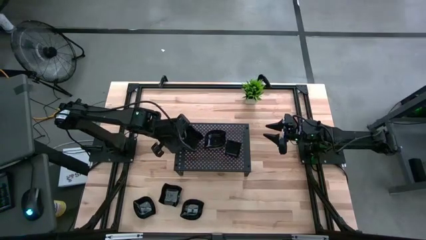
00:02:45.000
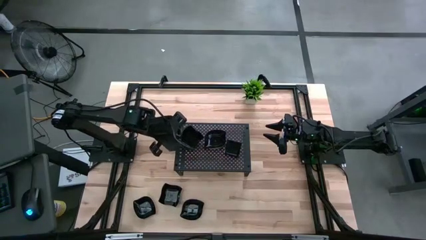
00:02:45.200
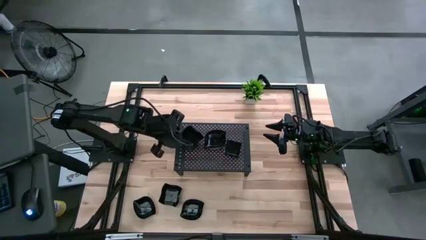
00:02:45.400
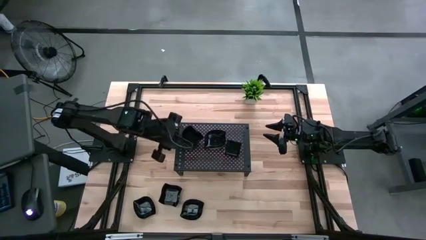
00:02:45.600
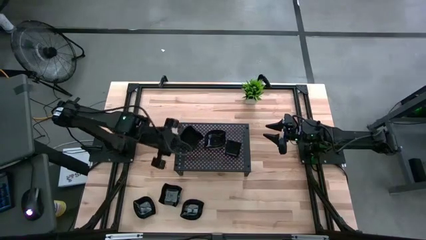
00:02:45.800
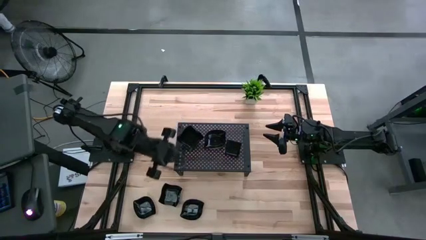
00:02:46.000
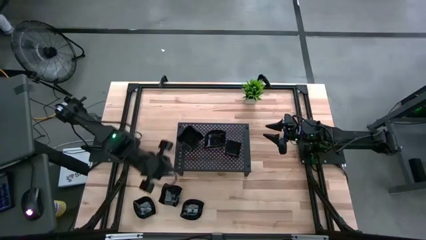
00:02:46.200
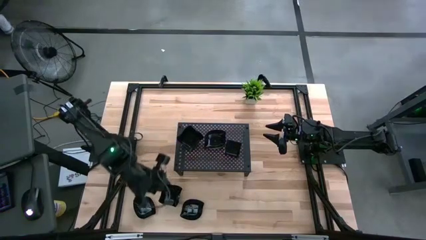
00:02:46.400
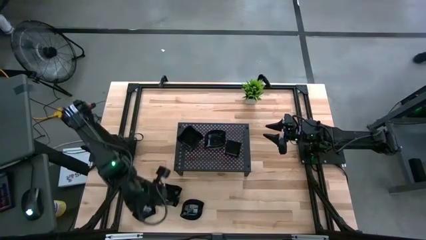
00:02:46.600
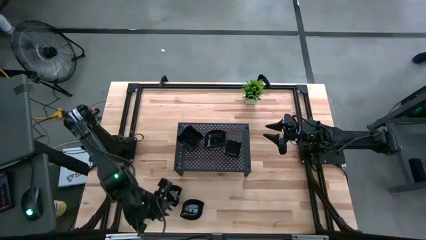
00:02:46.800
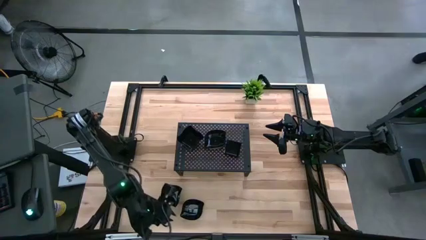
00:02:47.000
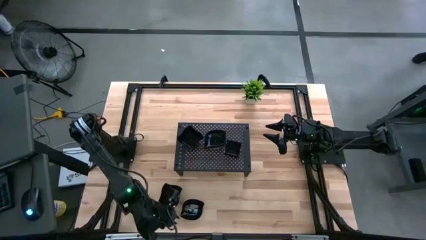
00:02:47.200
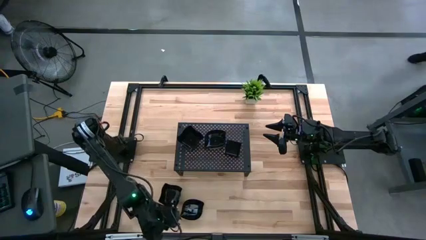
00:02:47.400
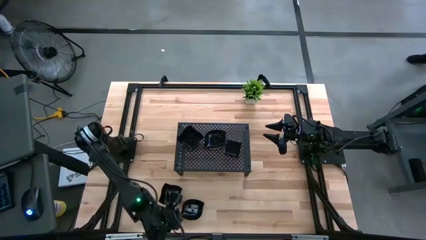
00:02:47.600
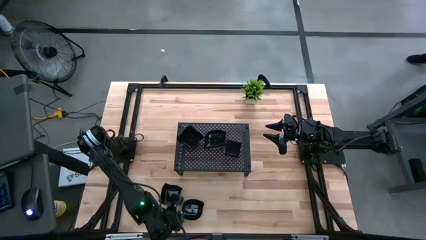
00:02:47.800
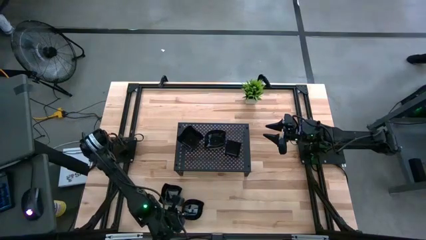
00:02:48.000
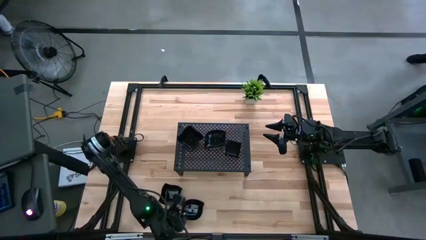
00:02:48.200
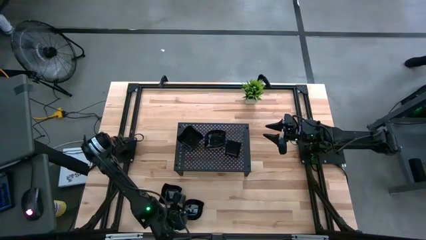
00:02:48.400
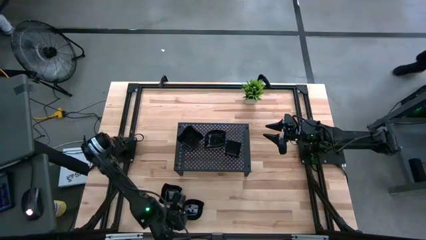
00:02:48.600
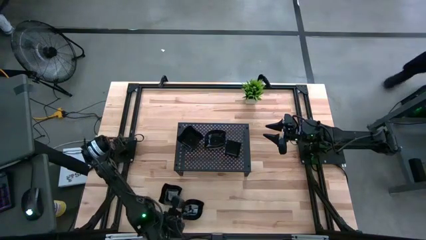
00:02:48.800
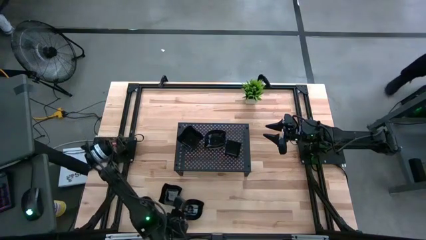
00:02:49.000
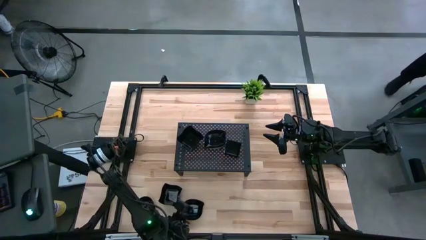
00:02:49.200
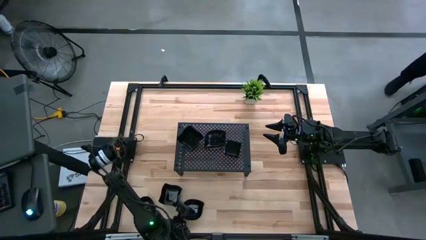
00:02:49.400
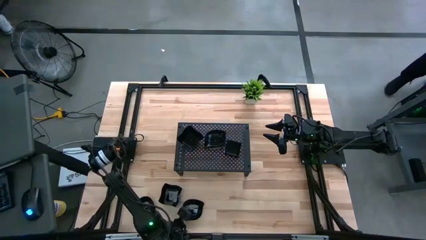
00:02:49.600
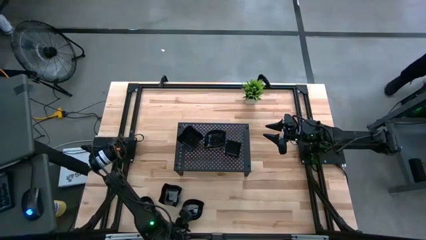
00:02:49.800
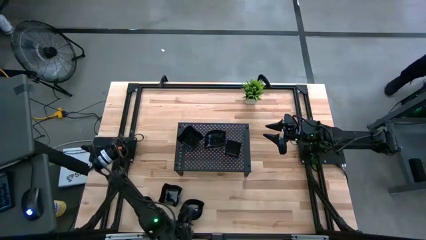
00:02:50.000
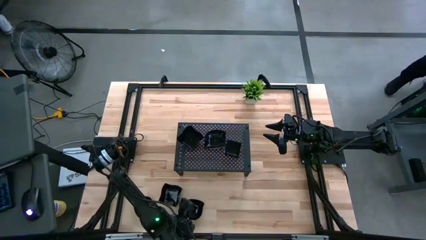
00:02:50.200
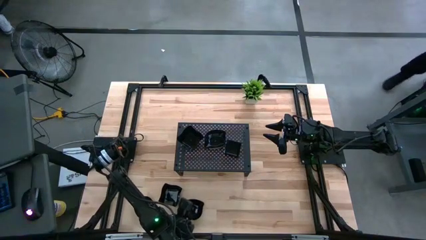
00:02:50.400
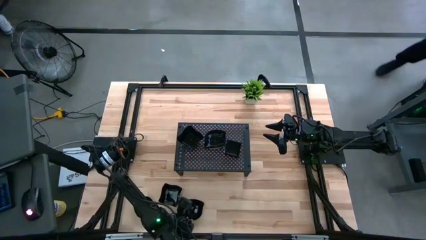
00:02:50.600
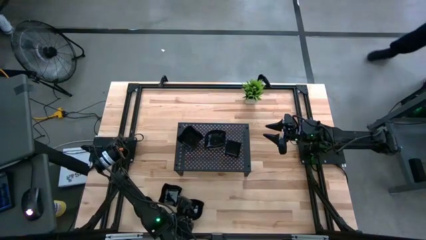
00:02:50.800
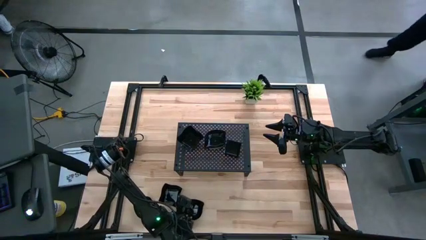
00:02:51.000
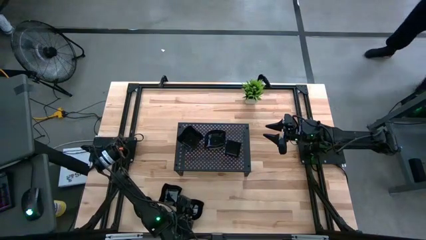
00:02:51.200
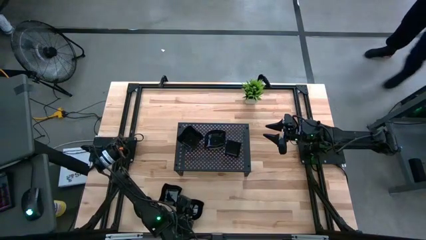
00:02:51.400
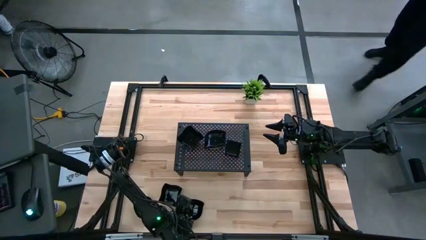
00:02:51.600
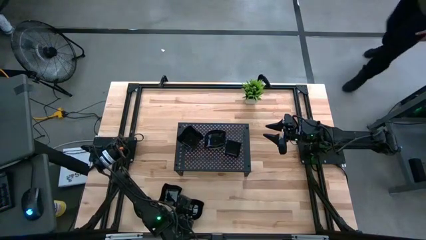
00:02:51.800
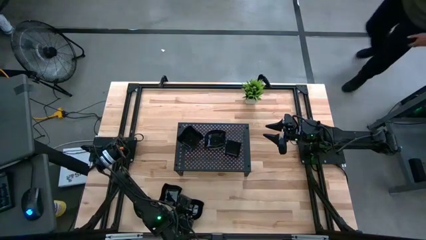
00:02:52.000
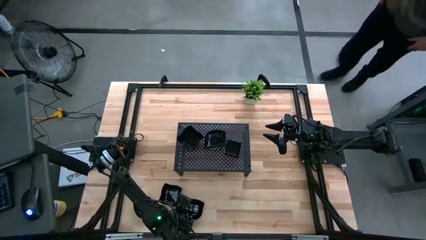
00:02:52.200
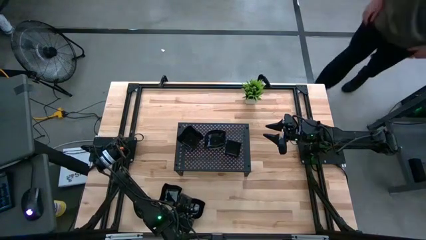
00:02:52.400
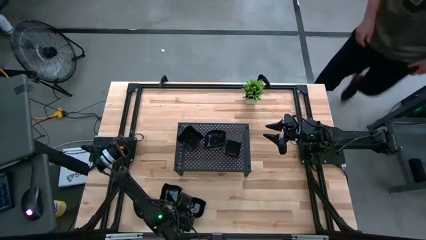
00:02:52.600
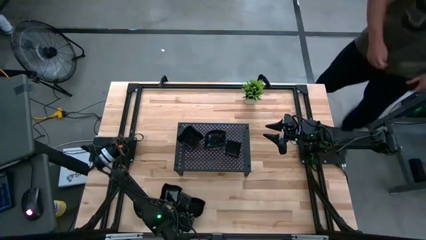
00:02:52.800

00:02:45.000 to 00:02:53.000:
Task: Pick & Place Mini shaped plates
Stack the right leaf shaped plate on top of the leaf shaped plates on the shelf

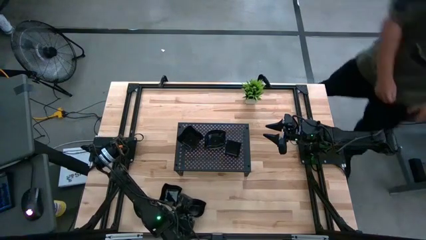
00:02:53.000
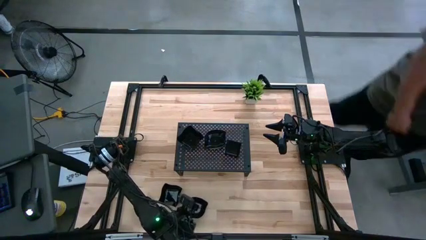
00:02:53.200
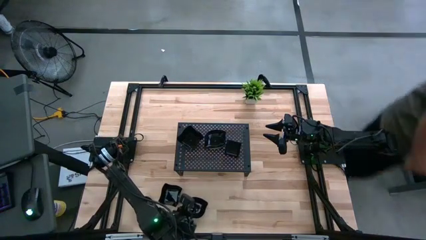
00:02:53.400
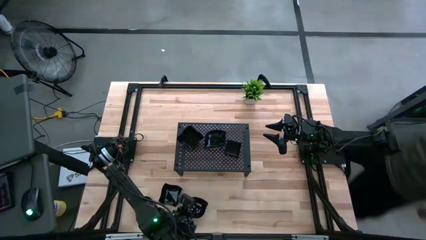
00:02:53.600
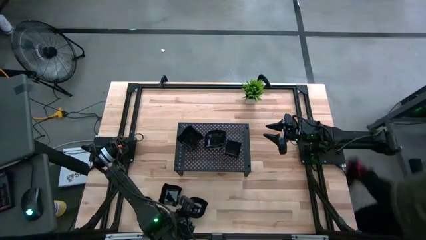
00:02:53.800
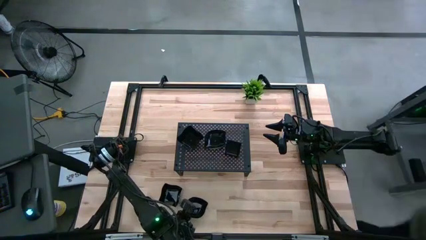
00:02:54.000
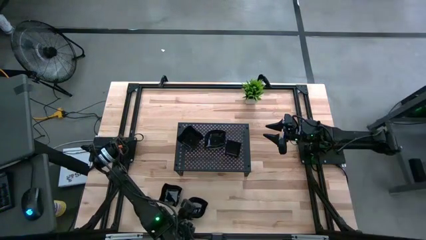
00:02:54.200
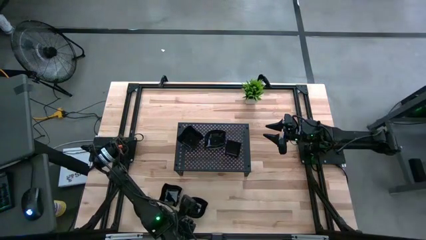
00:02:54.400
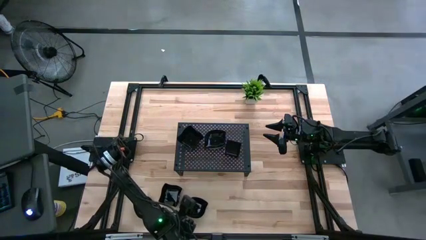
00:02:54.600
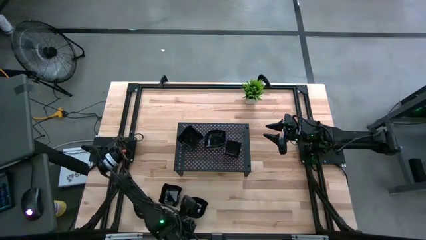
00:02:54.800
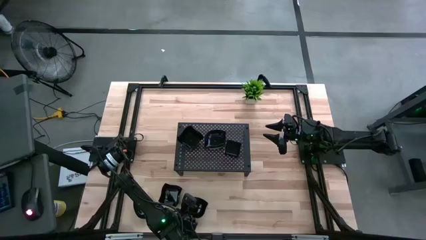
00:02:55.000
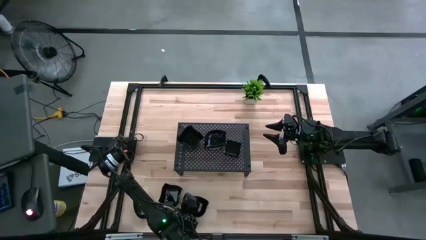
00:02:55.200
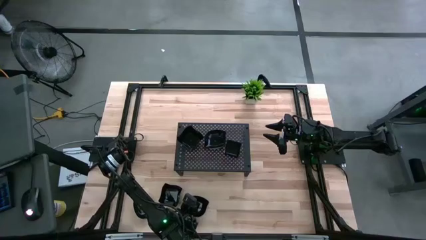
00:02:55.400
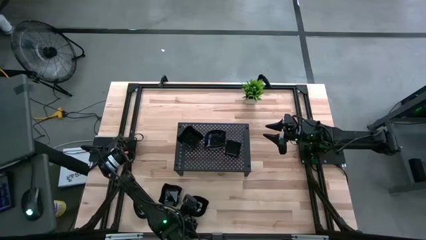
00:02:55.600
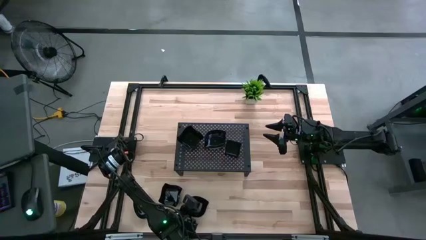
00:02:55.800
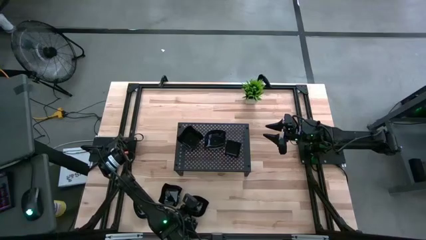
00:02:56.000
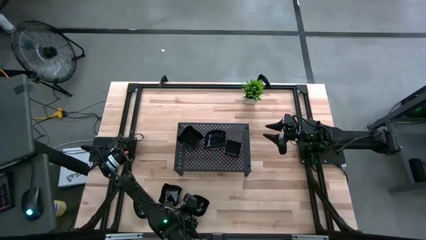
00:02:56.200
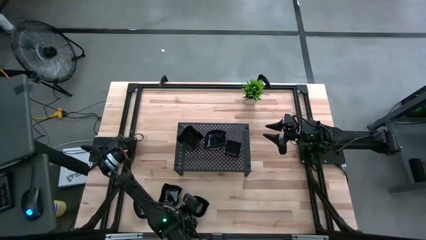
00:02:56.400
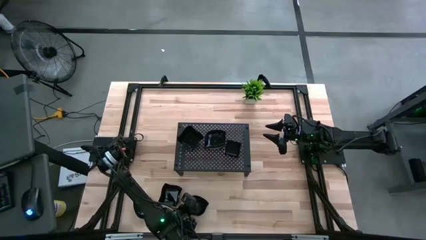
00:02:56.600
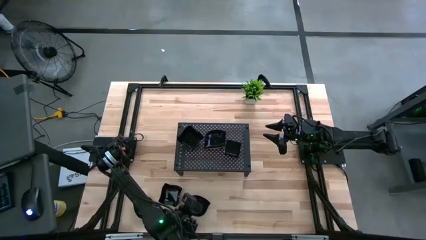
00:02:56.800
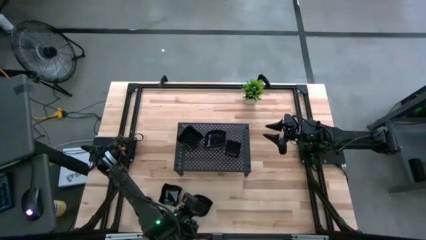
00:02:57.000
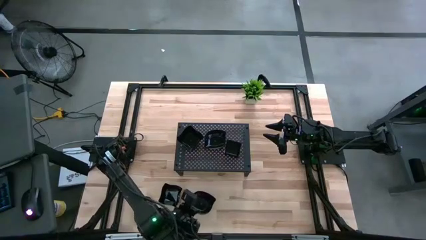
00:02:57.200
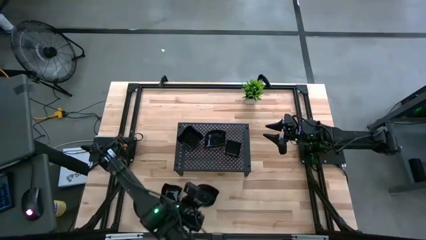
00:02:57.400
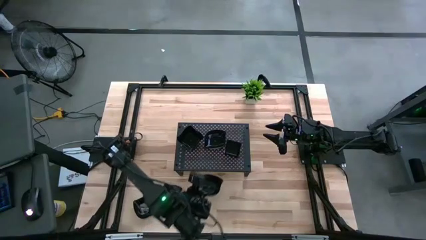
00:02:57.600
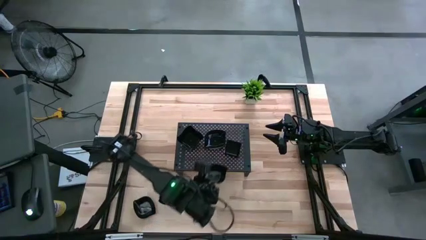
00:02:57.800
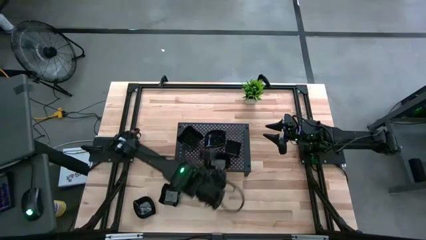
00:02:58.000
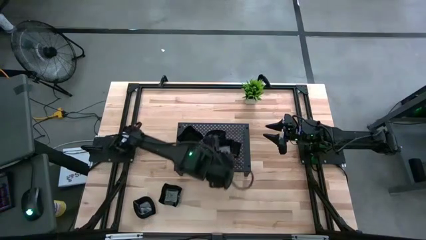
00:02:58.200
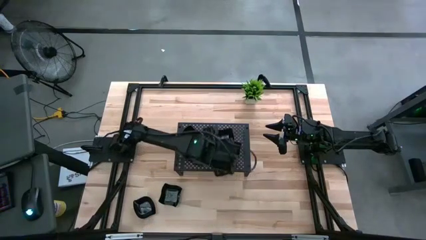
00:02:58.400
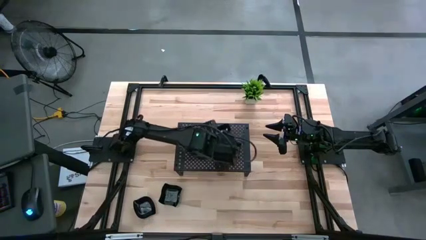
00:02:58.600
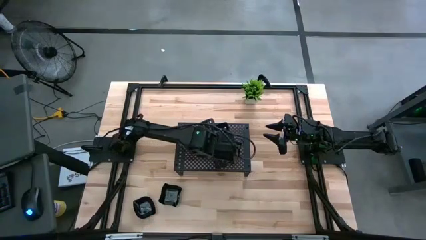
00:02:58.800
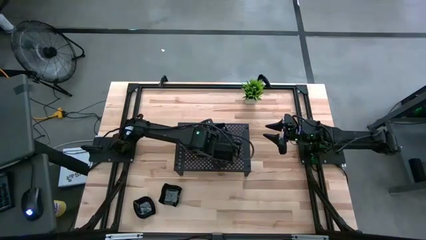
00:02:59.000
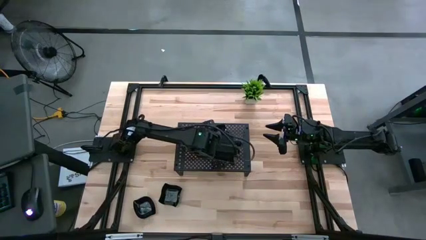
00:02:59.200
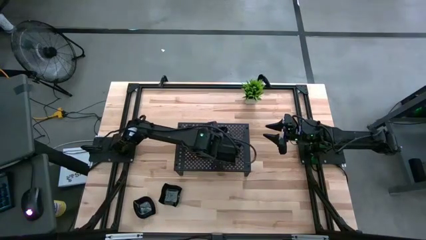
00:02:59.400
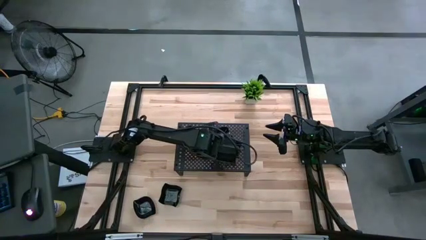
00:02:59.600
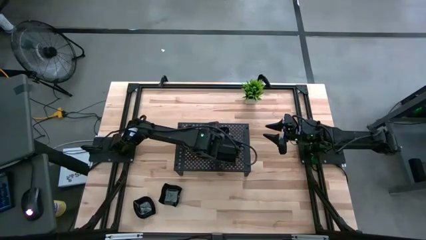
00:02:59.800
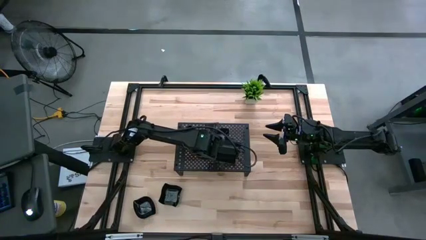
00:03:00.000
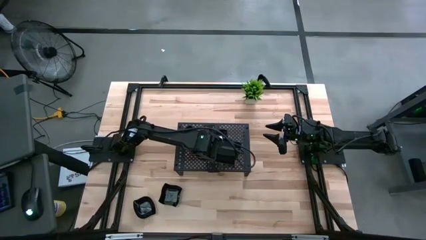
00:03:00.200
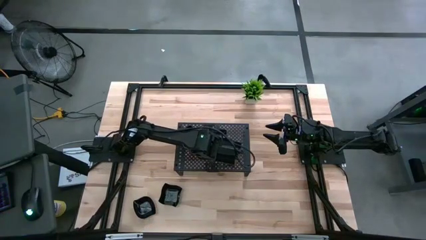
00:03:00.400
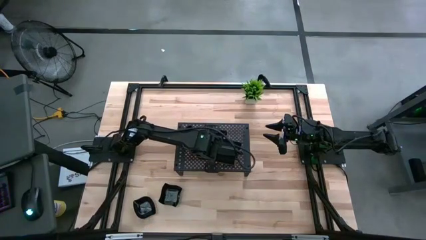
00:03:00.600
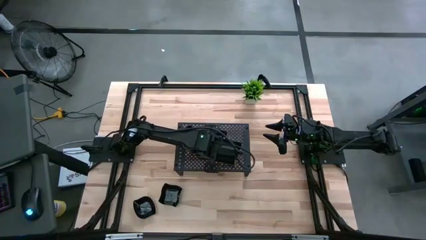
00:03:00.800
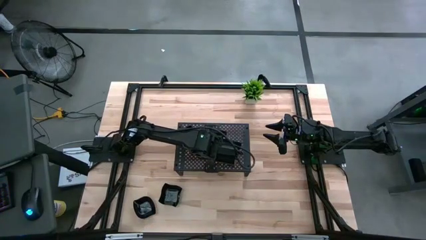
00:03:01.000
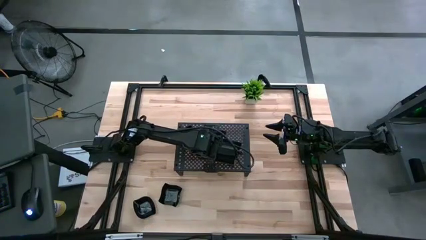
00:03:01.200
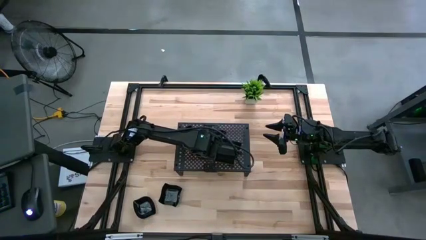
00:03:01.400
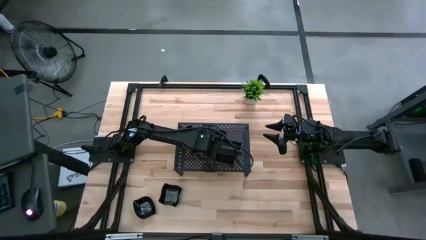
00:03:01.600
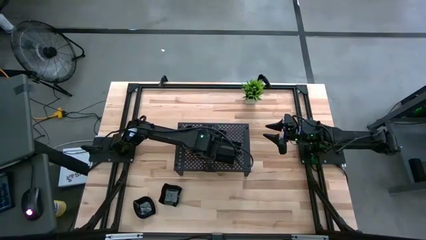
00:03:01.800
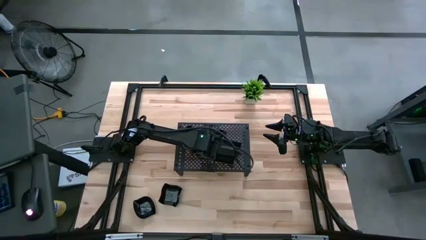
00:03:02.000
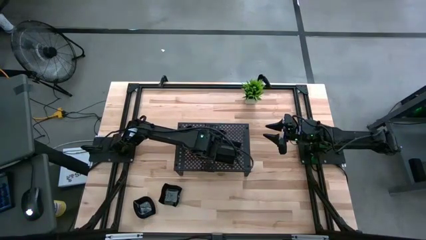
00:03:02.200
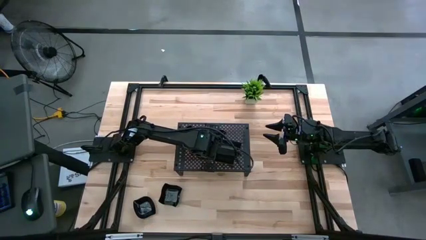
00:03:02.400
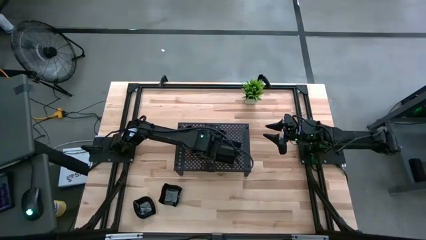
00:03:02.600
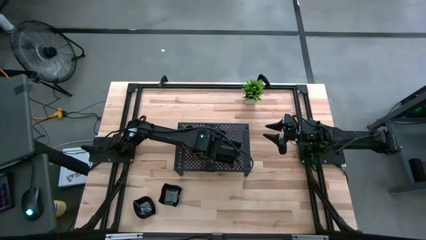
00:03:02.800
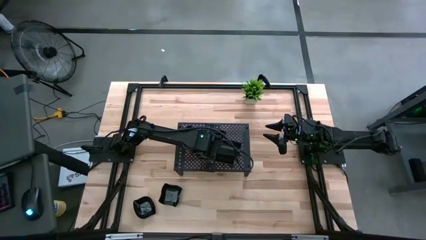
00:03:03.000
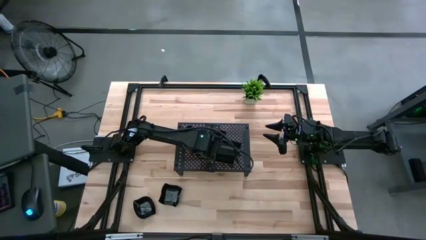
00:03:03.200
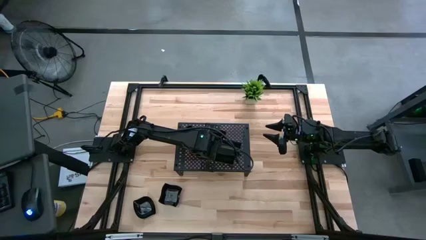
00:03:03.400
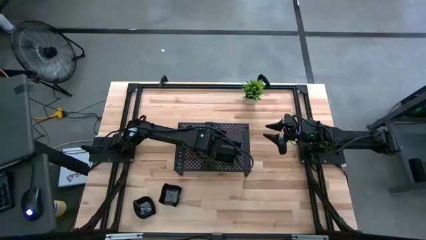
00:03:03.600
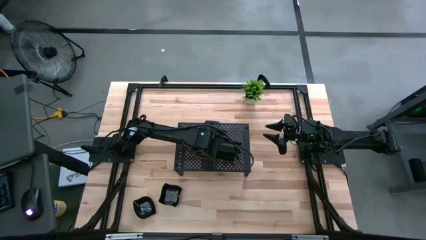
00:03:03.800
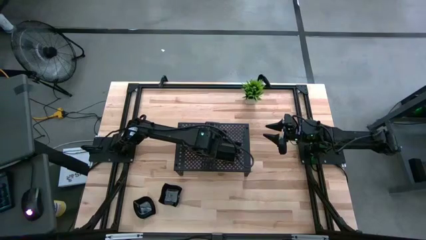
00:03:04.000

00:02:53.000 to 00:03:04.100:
Stack the leaf shaped plate on top of the leaf shaped plates on the shelf
